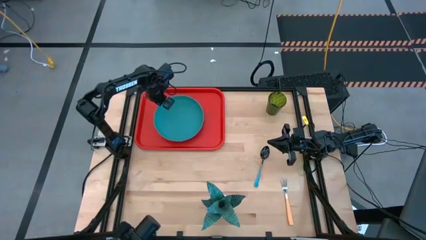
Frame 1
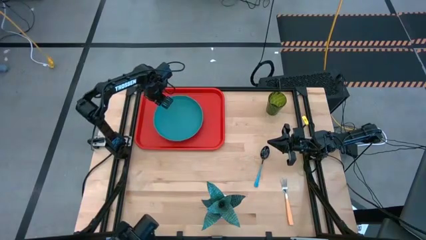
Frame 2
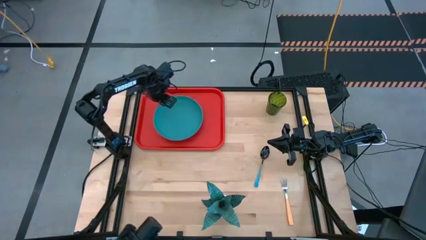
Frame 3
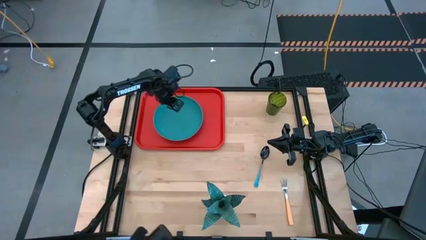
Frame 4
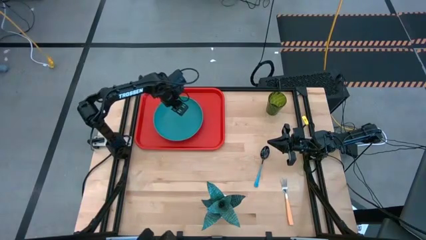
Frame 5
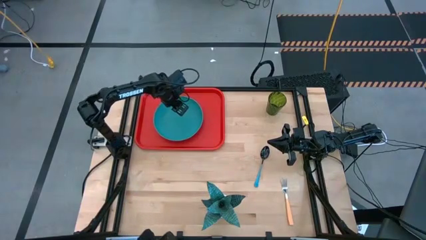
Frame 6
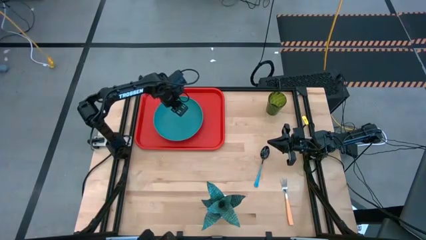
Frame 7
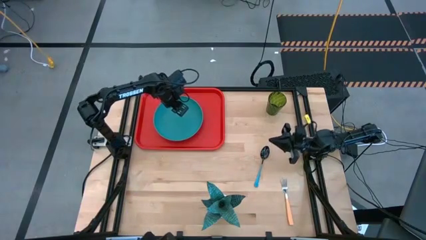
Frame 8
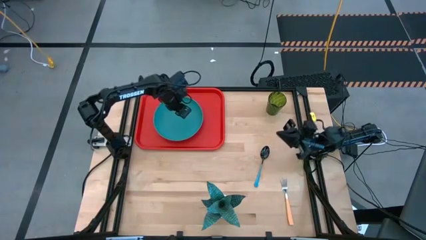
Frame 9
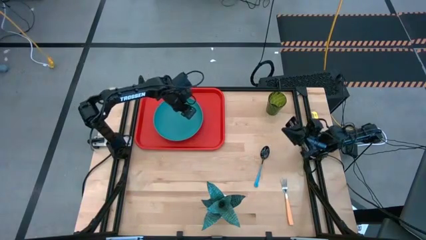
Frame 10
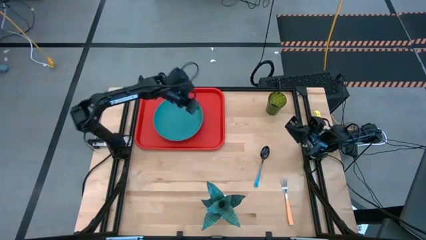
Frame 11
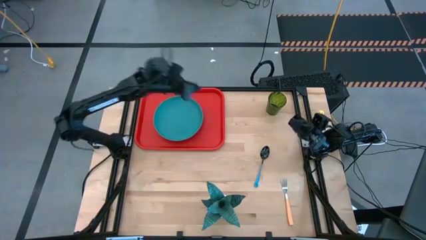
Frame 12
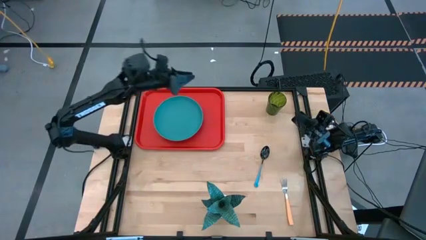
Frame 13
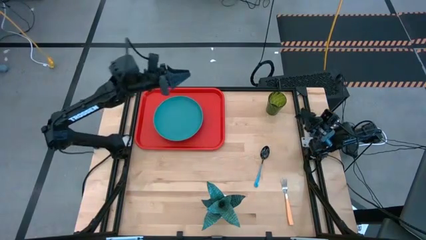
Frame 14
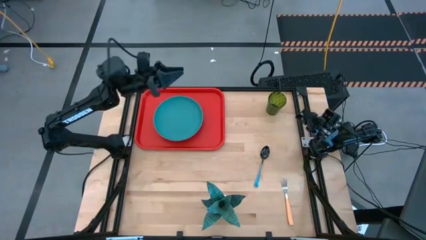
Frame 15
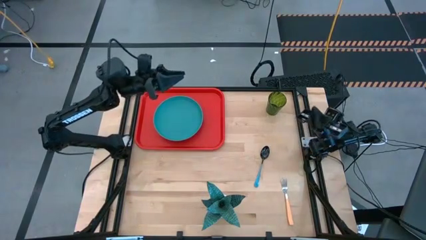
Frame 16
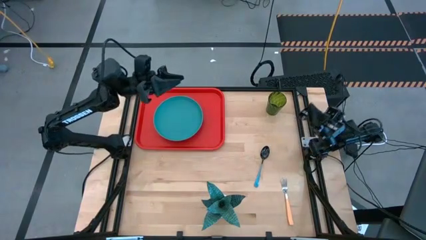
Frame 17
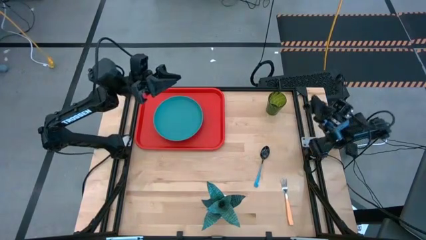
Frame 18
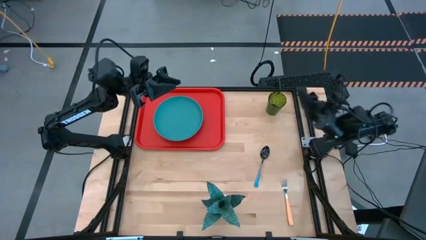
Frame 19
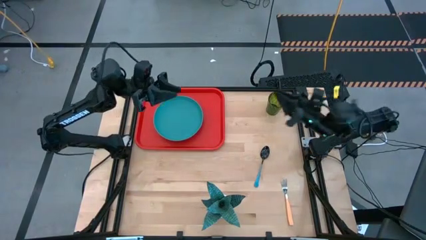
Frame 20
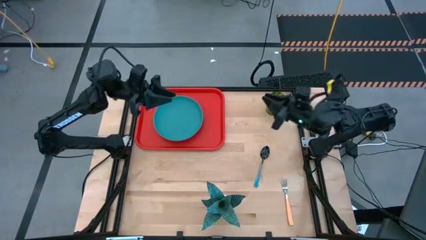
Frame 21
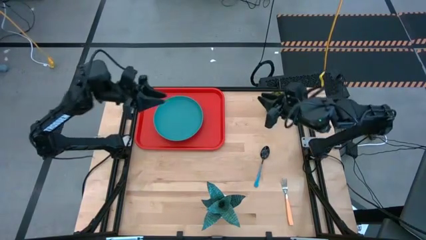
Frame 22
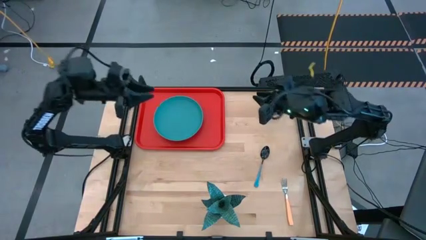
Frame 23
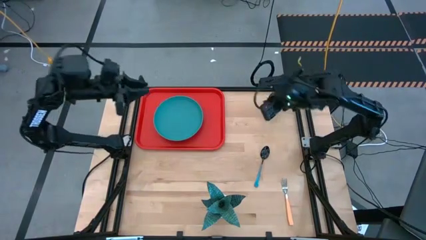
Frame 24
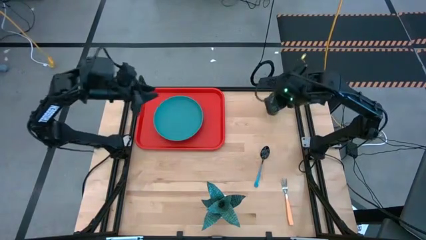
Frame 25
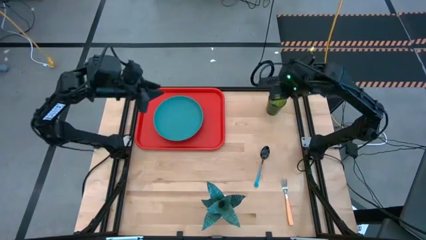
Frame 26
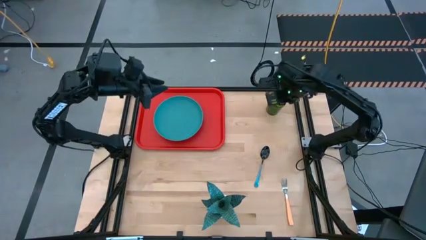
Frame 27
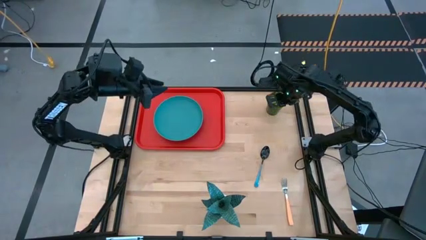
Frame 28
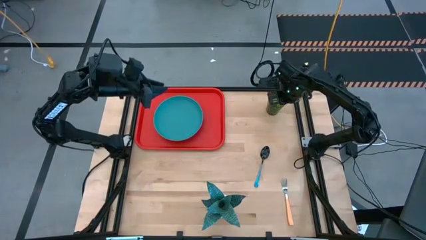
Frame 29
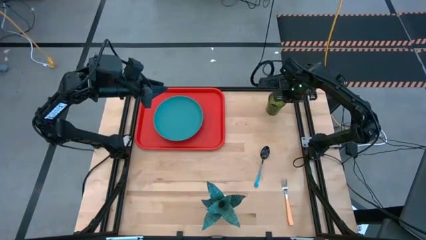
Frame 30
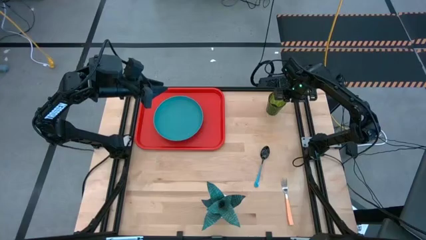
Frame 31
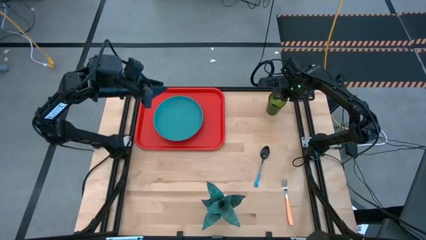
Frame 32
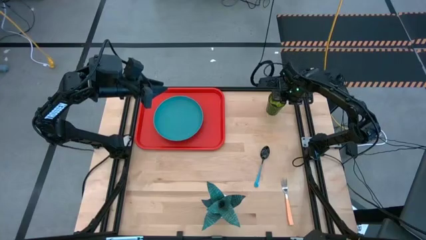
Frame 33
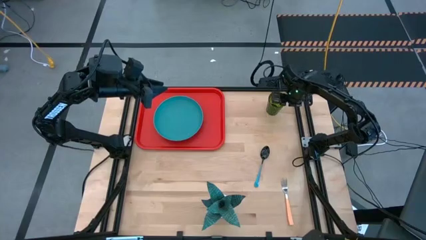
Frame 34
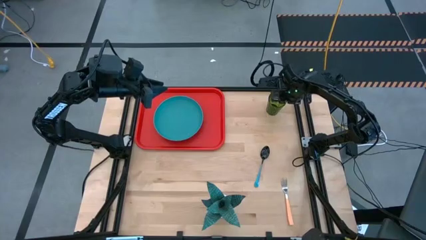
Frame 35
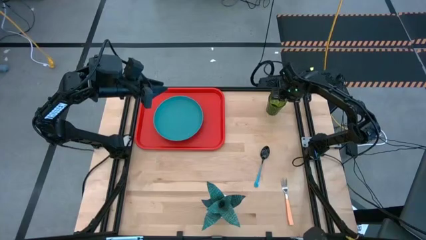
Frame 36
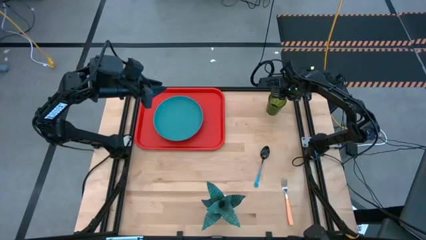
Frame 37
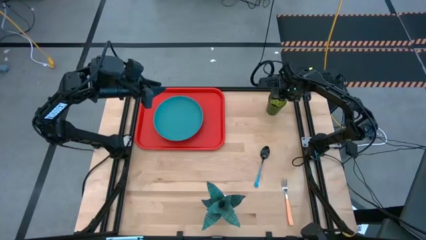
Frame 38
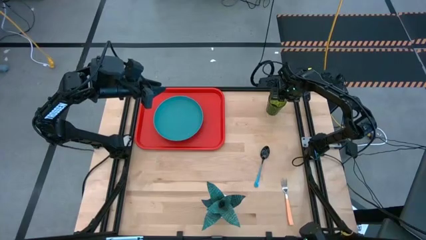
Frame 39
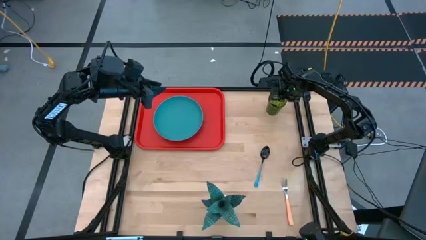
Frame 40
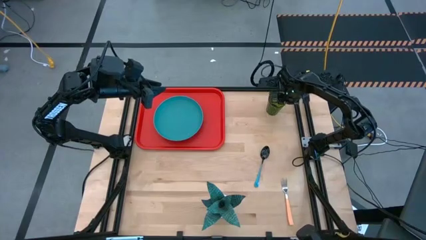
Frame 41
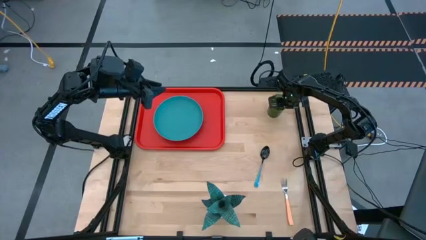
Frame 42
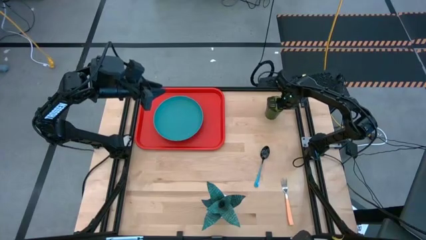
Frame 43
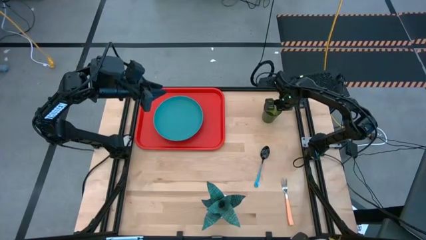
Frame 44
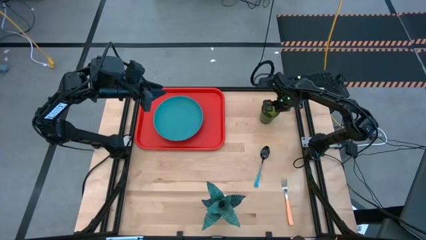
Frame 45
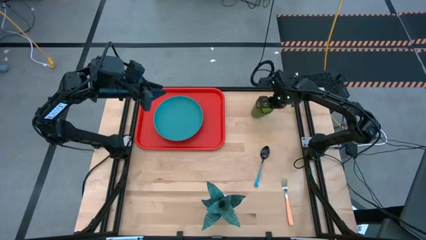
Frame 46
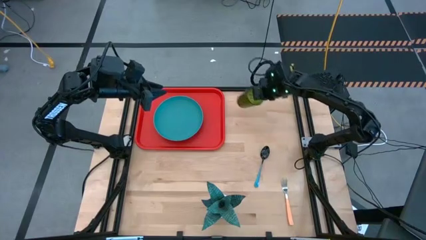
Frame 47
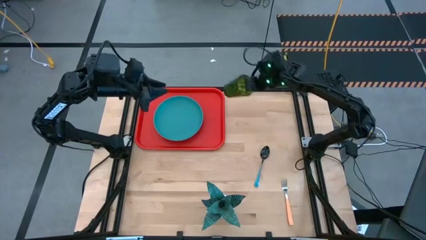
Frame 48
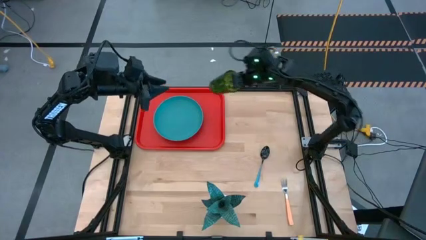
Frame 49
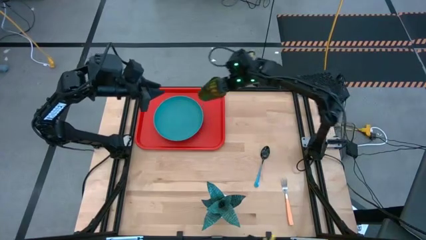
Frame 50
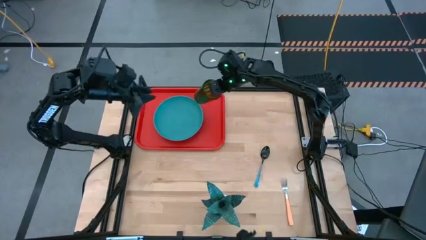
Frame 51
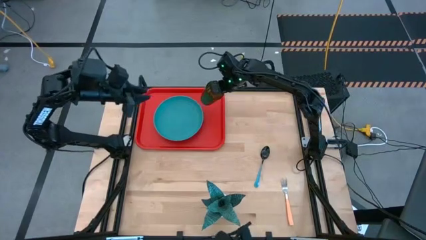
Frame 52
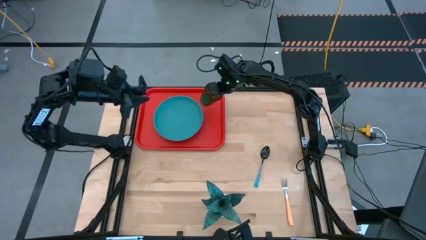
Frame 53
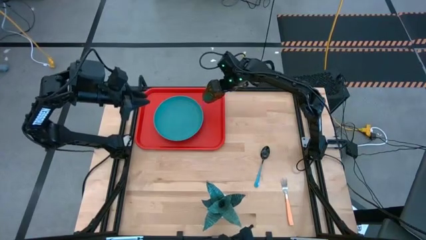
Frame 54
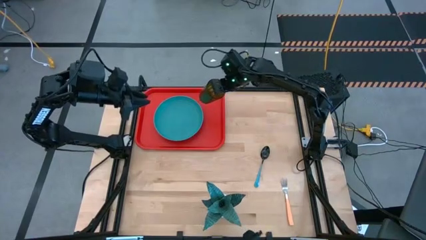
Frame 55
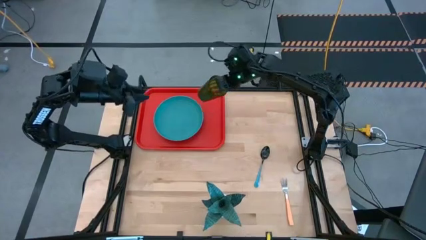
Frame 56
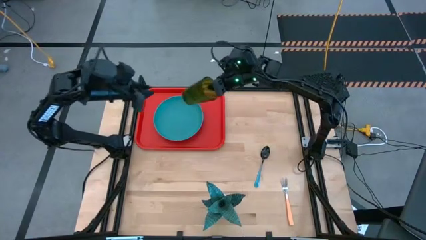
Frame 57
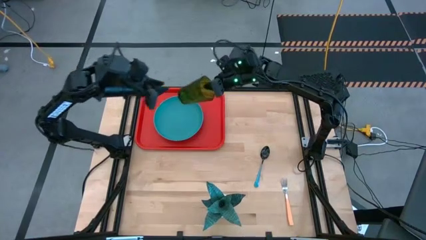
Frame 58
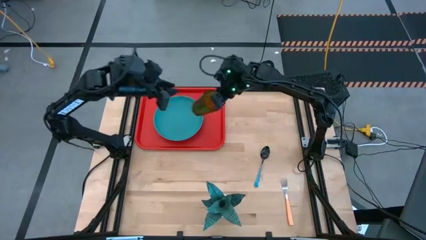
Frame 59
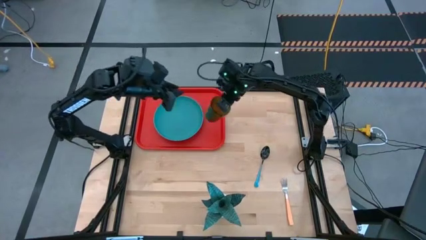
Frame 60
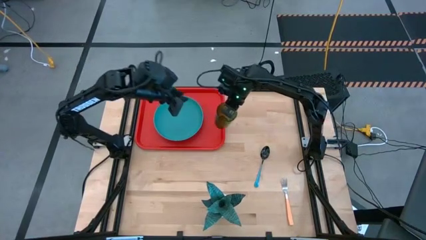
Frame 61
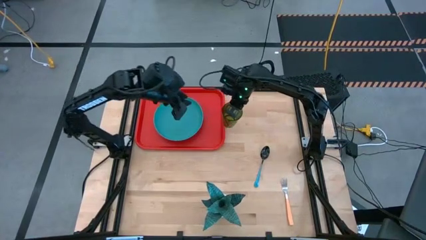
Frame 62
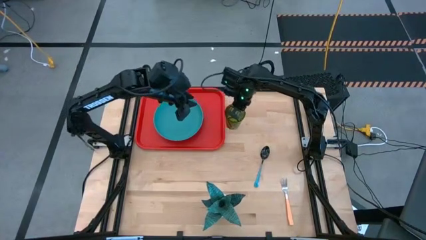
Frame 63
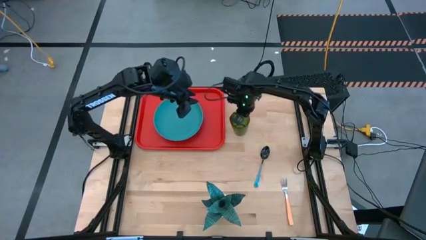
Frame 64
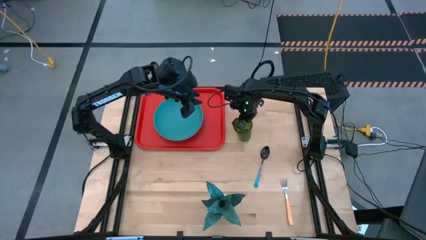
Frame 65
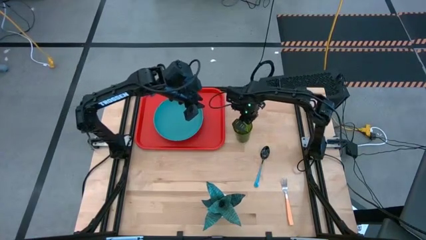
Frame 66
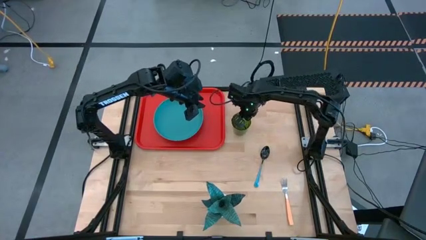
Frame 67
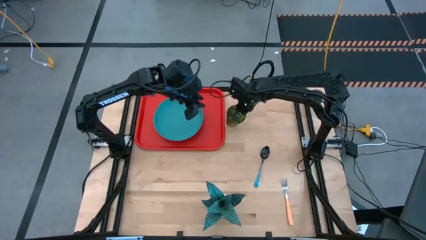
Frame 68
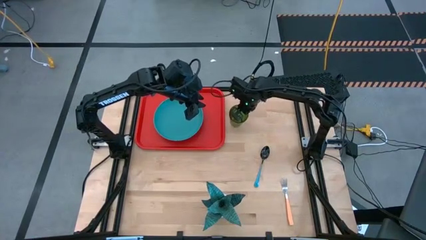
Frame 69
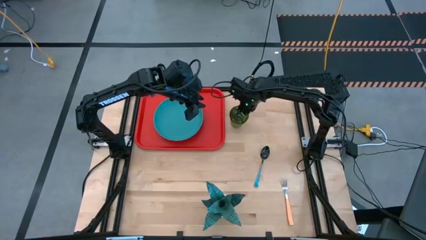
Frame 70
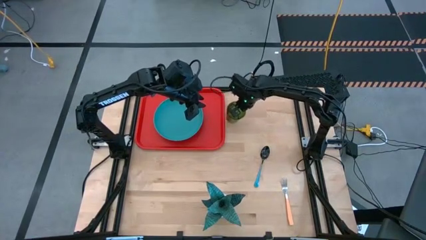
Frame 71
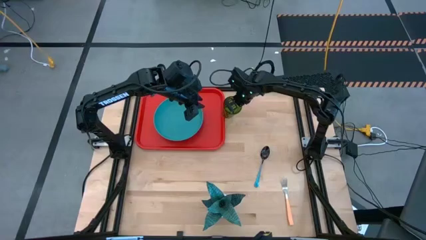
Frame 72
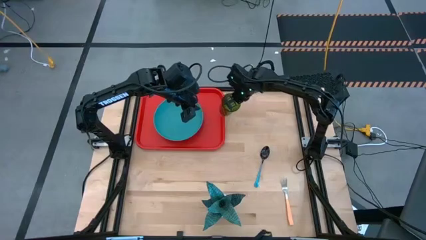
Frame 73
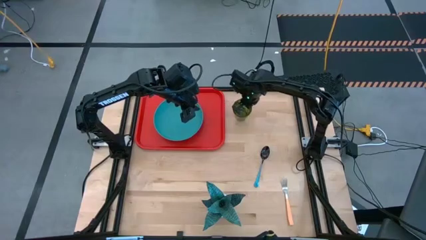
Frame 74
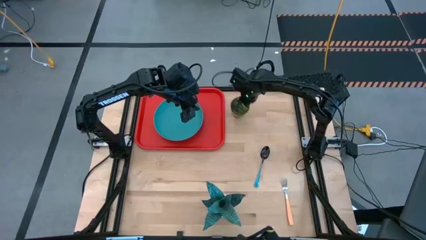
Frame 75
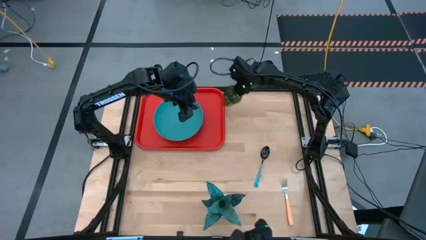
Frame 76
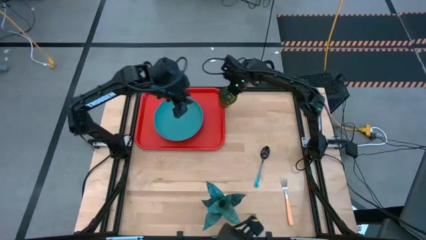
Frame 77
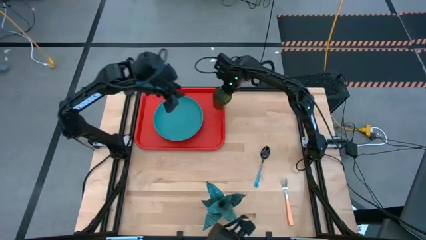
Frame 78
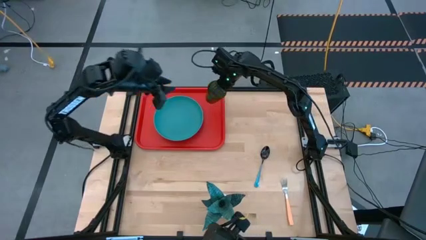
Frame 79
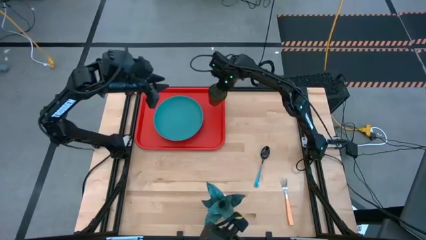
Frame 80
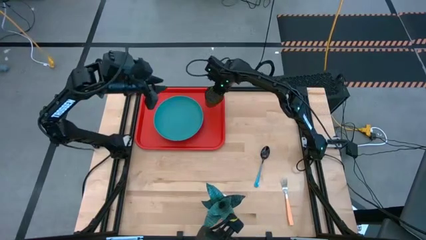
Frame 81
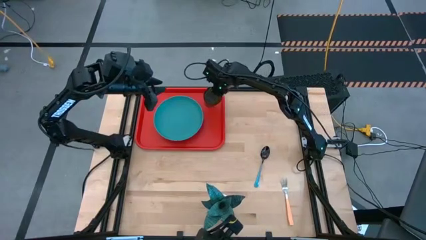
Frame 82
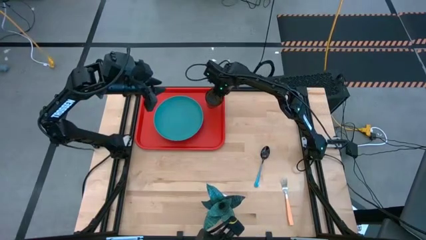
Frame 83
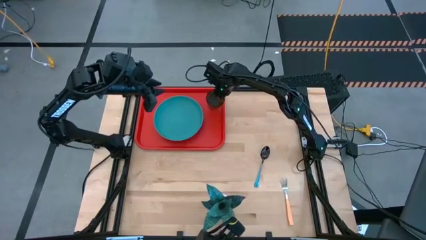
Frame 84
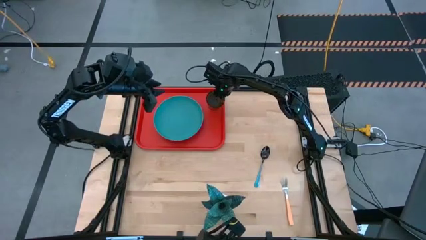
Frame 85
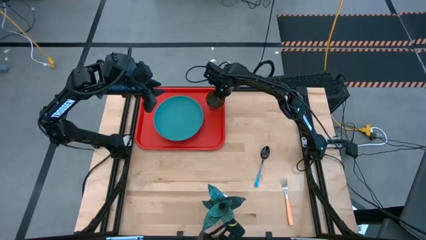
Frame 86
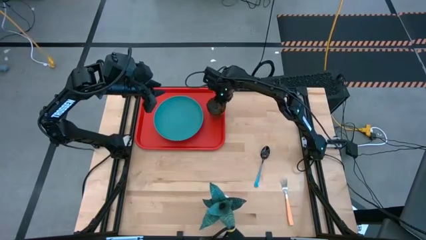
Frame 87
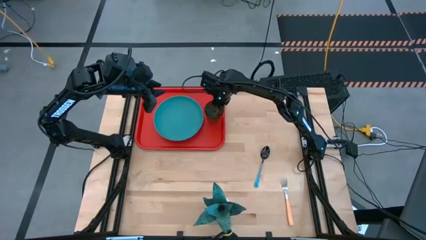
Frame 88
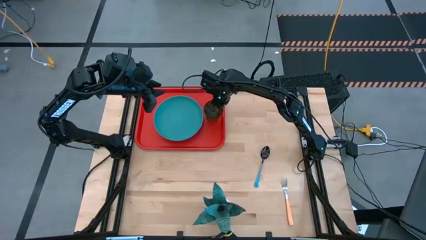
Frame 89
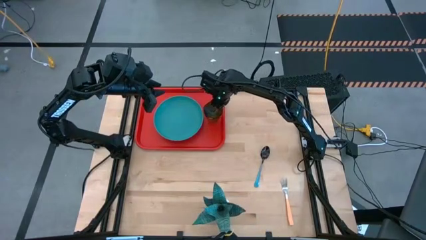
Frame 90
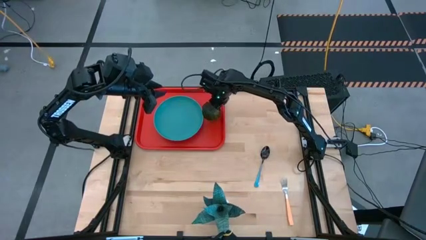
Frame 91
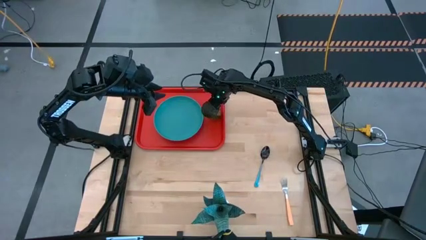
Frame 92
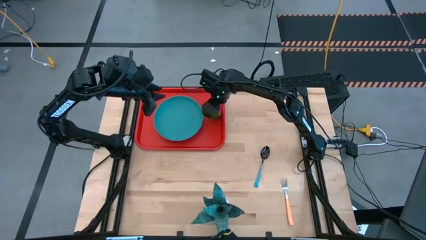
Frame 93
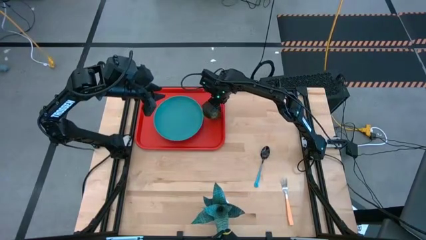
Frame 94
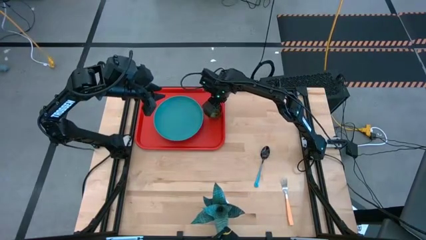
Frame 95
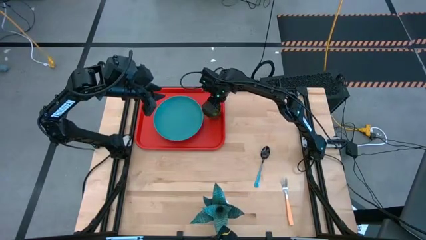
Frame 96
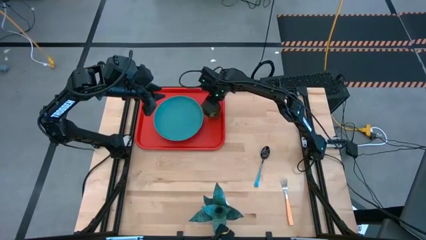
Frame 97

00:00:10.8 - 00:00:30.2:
Task: Pick and place plate/cup/fork/spoon on tray
Put the green cup on the orange tray to the right of the green plate
